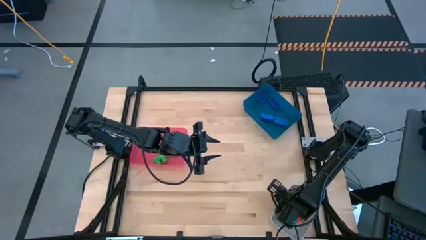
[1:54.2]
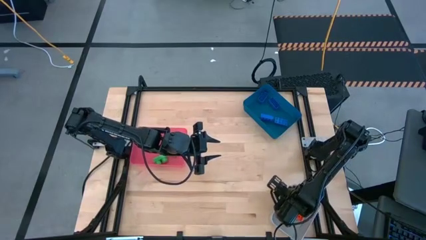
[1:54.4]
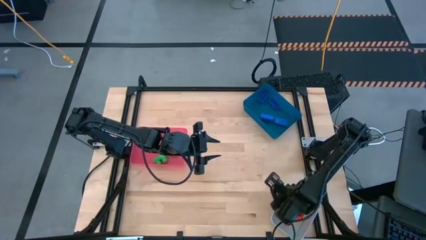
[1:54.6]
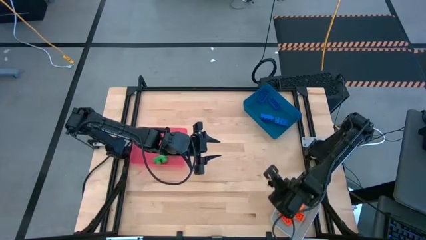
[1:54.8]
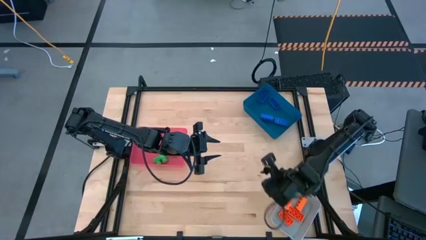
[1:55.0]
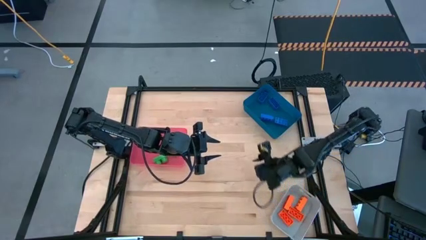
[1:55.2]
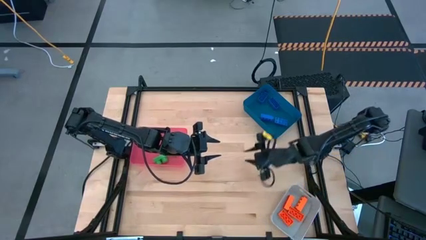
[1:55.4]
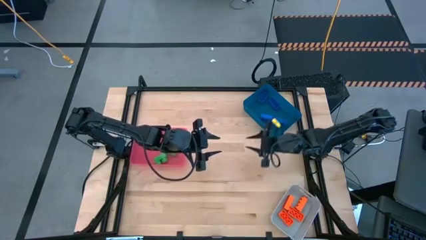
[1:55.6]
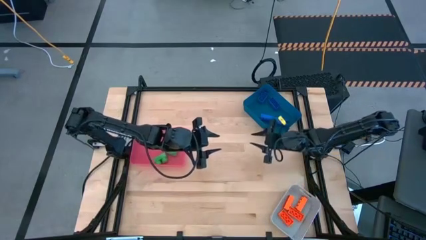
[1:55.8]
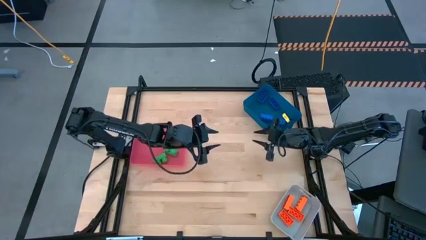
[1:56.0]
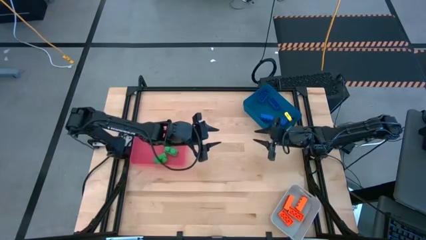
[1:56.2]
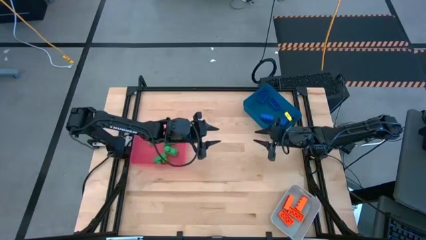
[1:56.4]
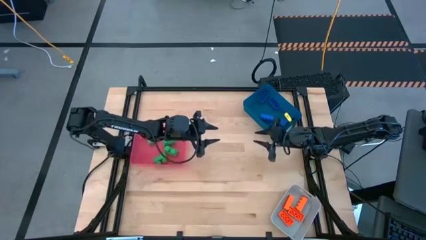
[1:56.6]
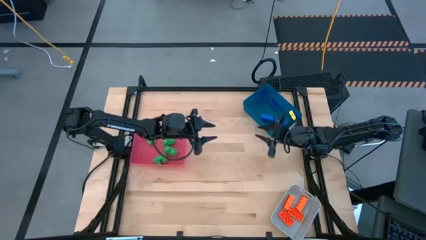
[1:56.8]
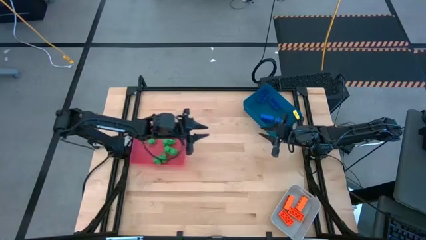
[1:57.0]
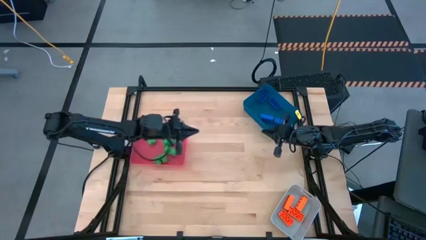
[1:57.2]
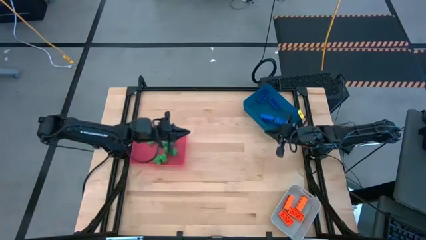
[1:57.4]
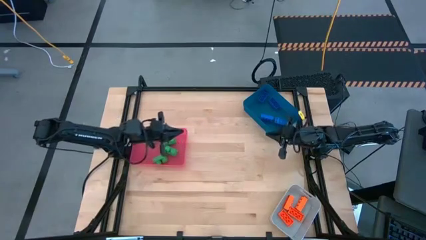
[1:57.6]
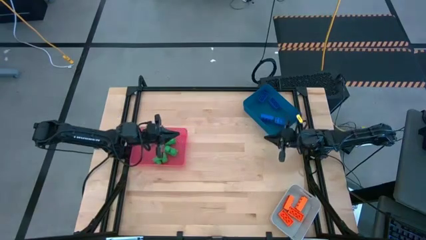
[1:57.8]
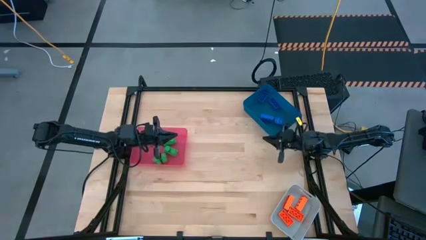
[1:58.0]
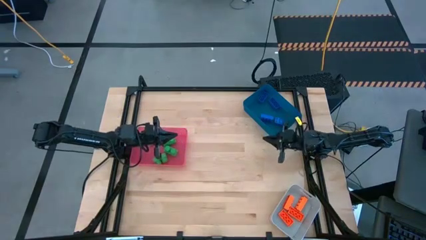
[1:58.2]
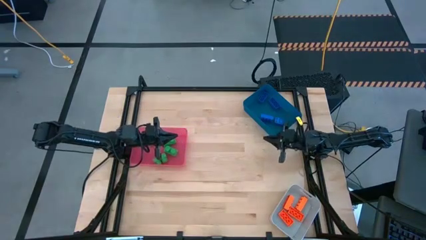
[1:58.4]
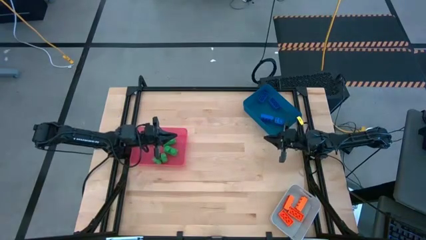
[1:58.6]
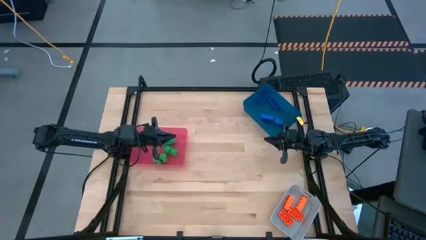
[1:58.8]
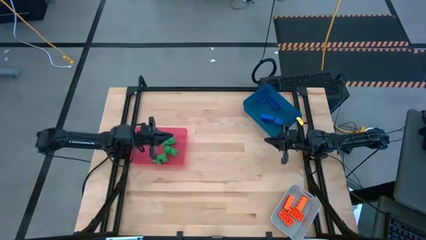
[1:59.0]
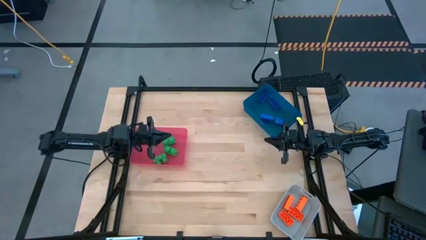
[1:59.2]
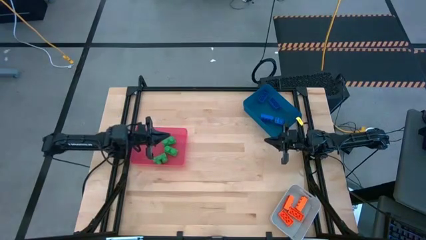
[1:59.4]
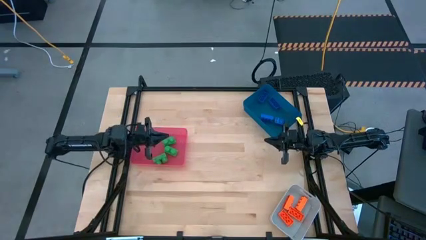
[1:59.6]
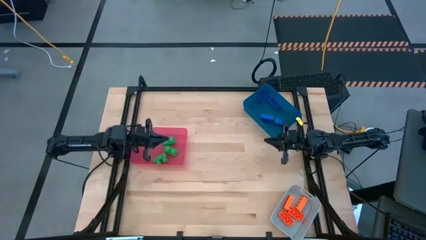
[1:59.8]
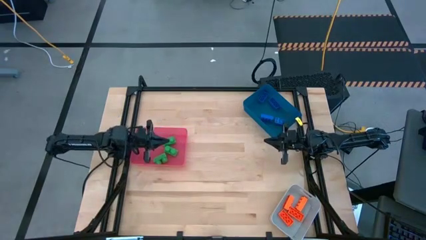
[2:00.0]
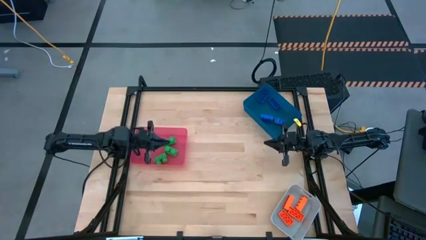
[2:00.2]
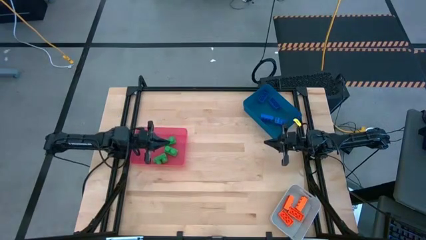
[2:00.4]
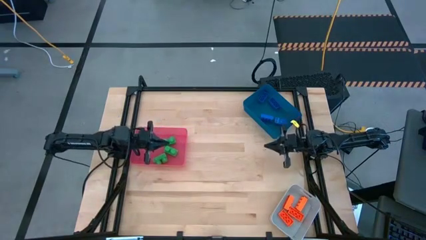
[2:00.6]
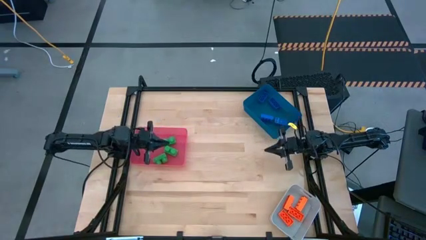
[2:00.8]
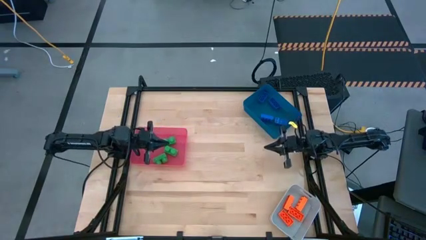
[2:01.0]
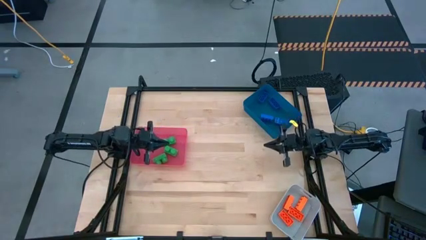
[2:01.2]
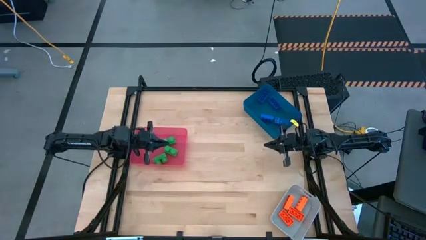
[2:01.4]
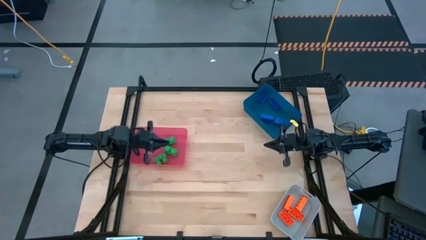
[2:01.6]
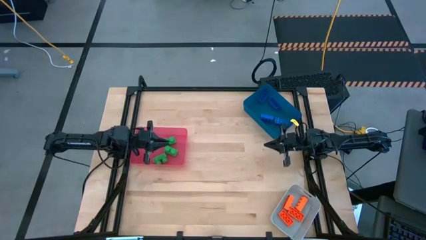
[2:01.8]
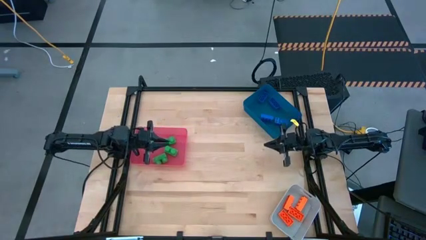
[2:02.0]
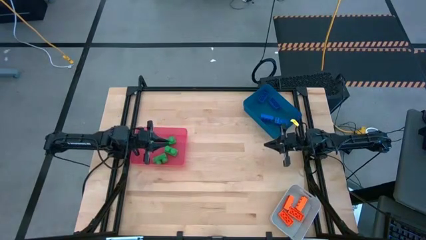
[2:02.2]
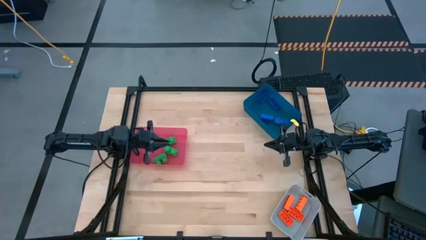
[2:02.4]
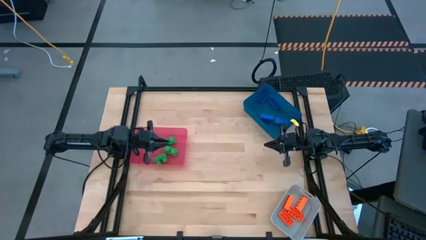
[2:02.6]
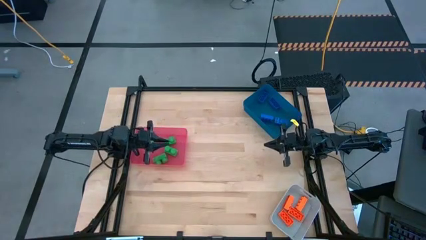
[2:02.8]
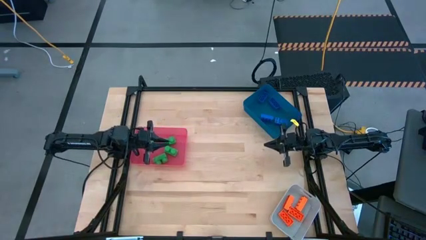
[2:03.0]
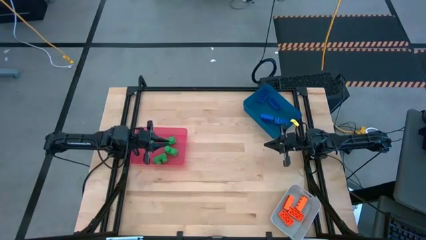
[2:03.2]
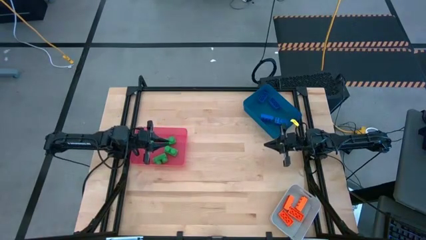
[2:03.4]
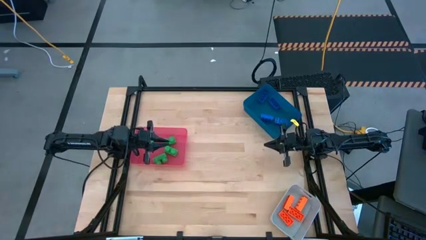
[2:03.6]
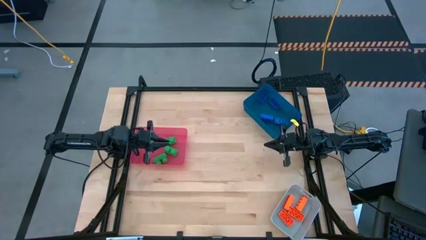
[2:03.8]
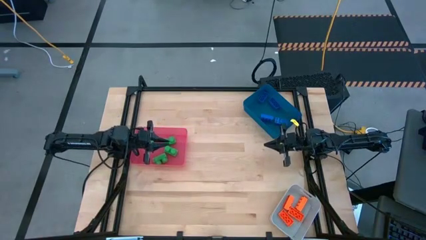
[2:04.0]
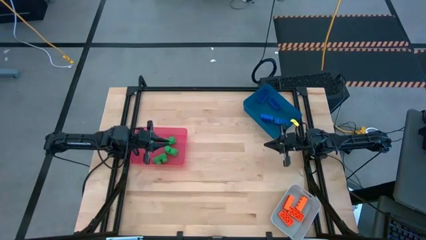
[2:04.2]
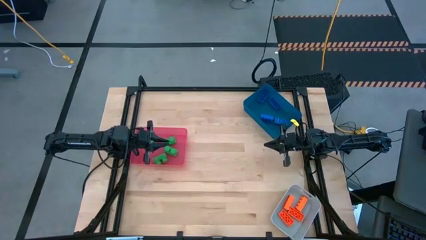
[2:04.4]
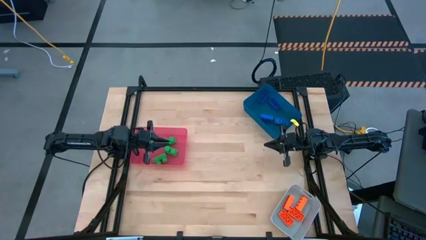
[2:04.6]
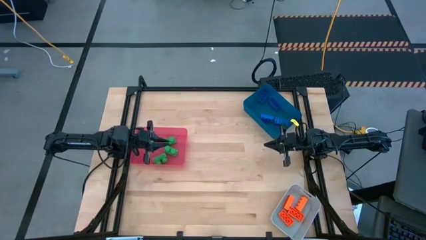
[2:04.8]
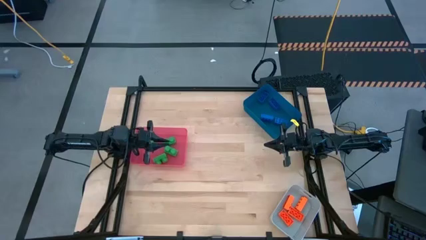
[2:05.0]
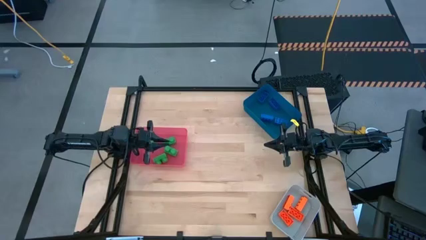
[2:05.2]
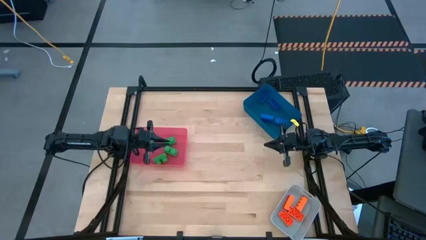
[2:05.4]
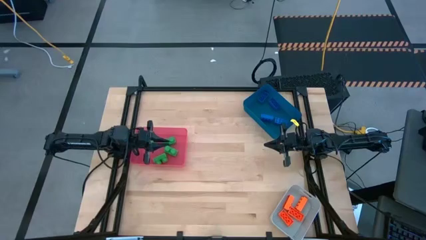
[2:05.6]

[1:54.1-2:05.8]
Task: Sort & place blocks by color
Return to Home Position
